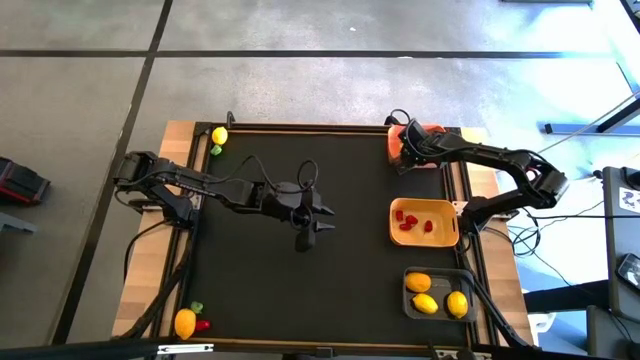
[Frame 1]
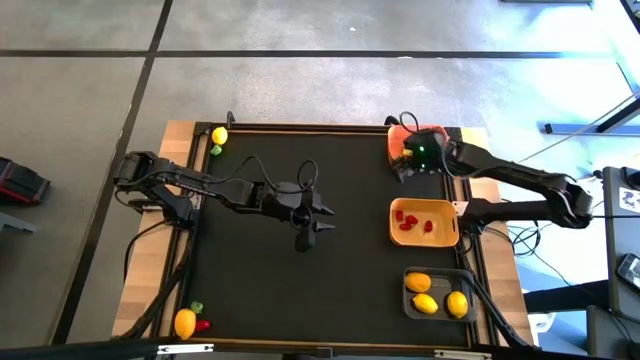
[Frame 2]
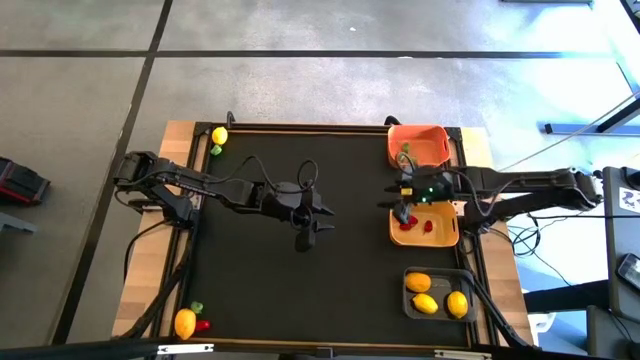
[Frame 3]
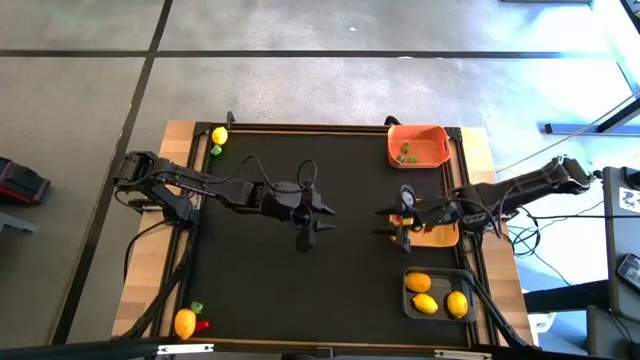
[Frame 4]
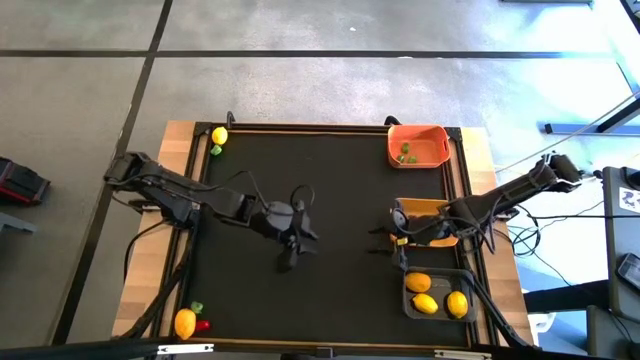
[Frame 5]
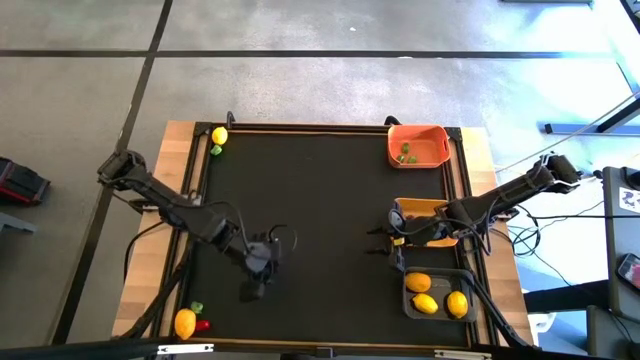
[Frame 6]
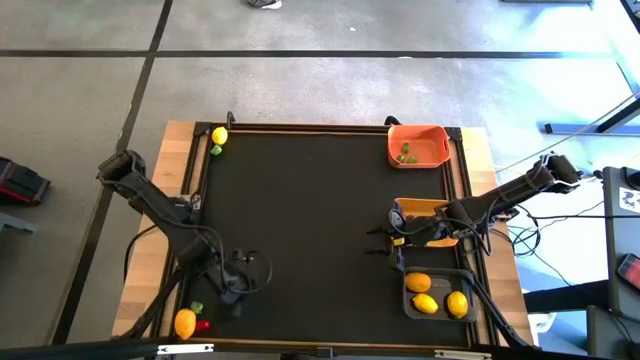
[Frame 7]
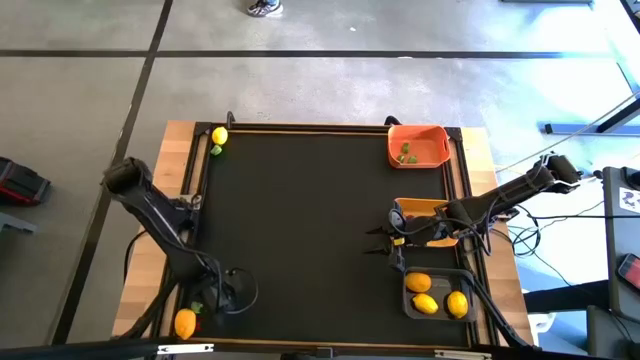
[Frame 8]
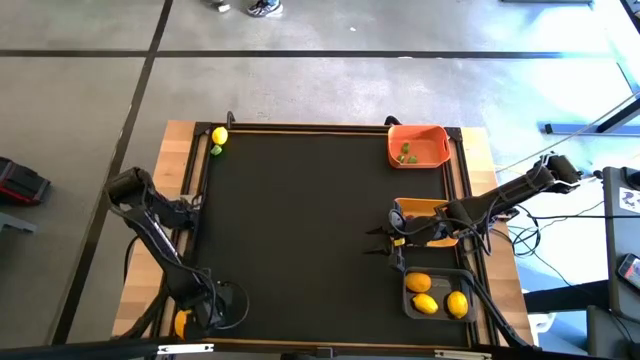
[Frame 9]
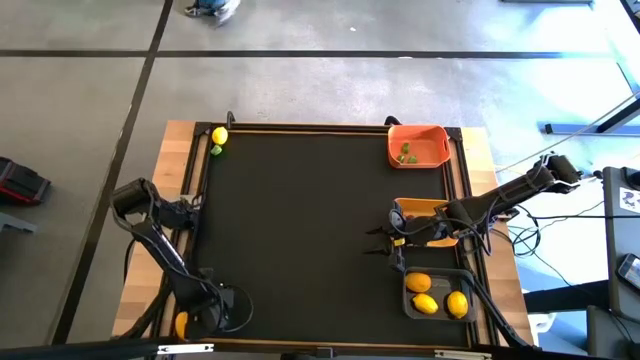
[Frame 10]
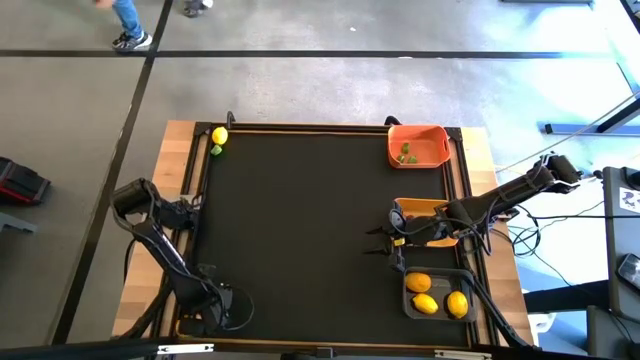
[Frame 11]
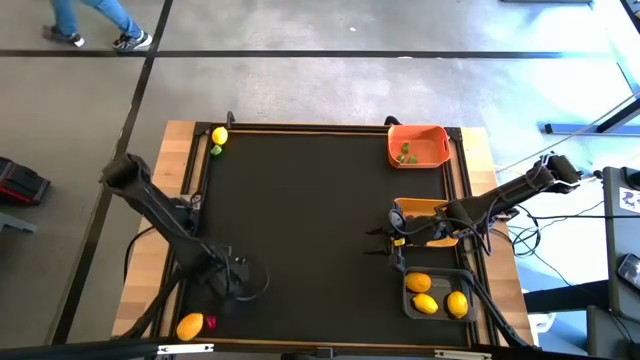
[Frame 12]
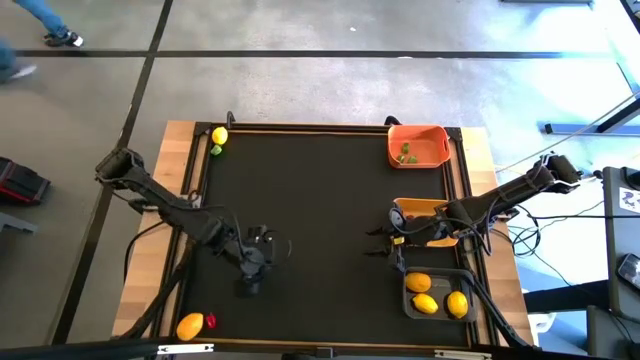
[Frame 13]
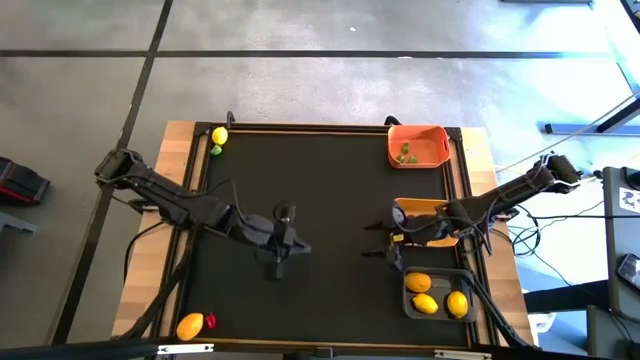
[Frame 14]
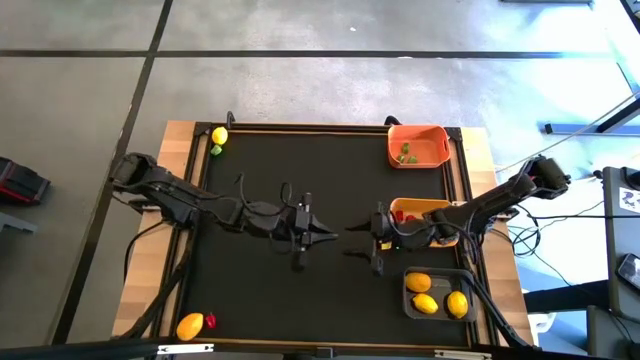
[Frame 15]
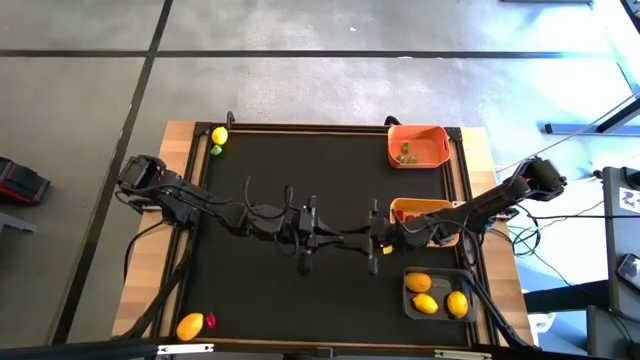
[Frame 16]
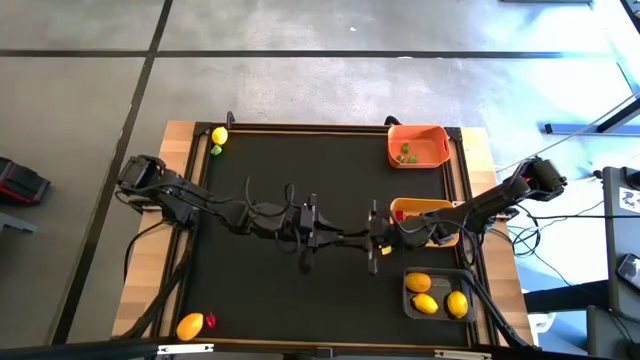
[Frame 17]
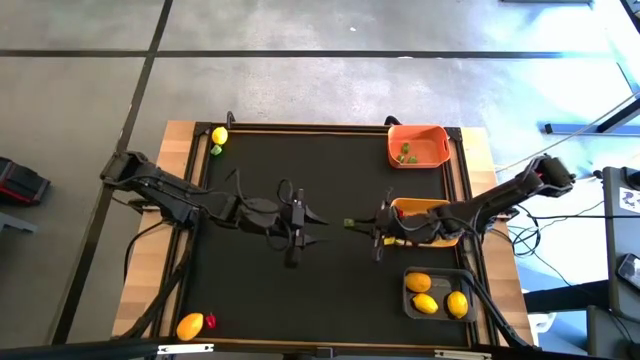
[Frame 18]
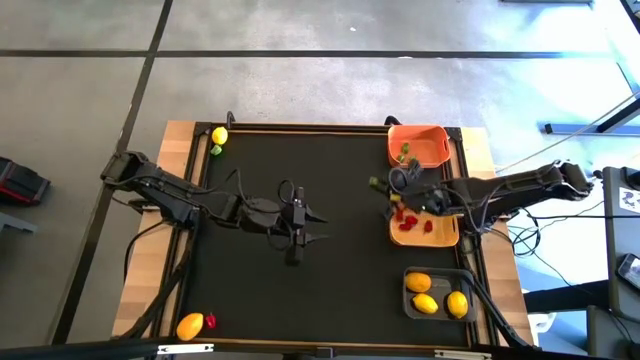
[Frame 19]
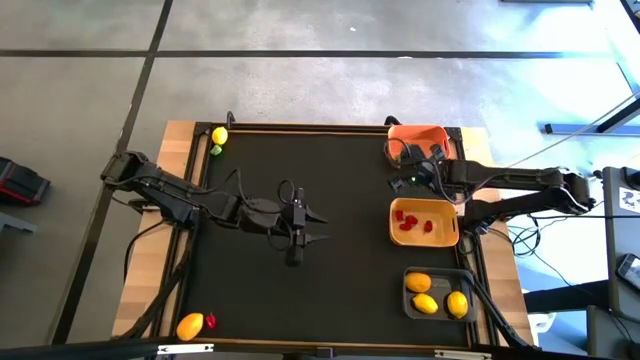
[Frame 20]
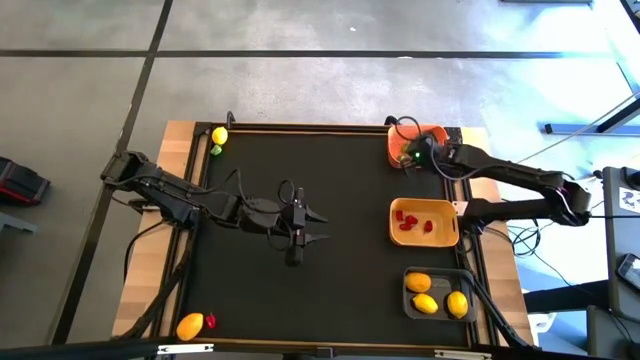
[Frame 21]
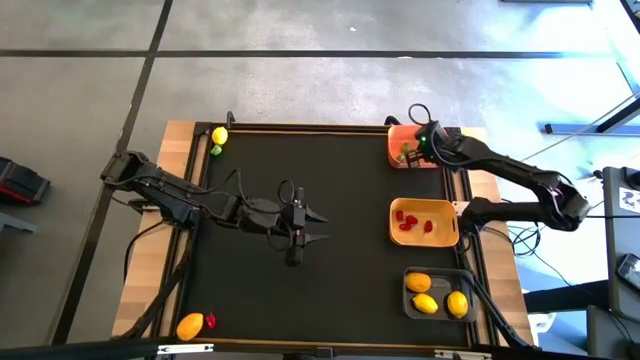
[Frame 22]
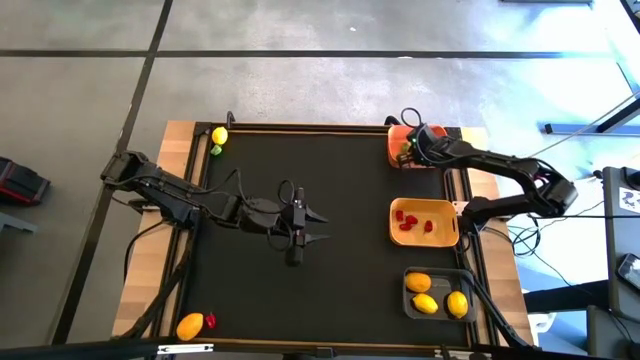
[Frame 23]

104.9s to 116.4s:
Task: Sort produce into baskets
Put the bottom green chili pepper into the orange bin

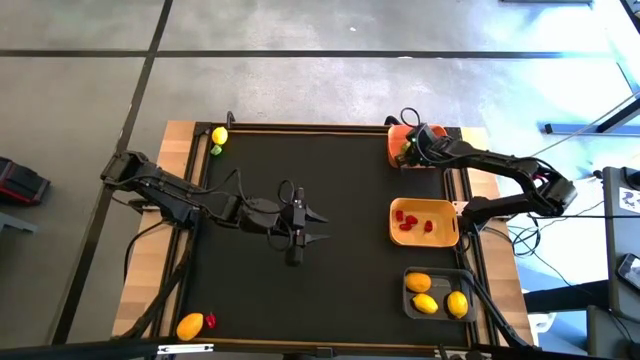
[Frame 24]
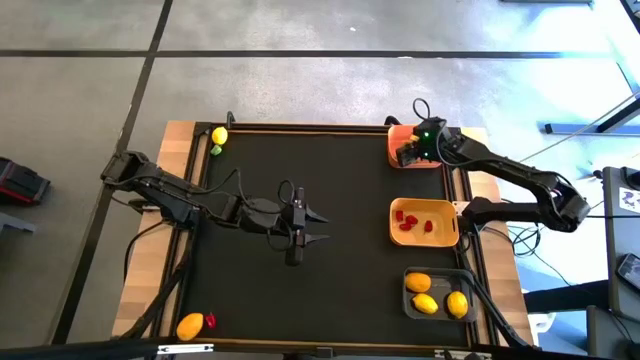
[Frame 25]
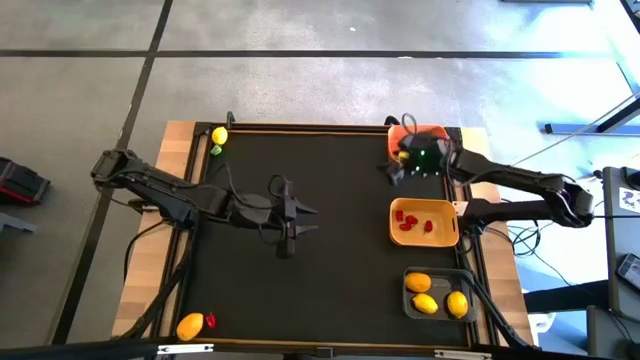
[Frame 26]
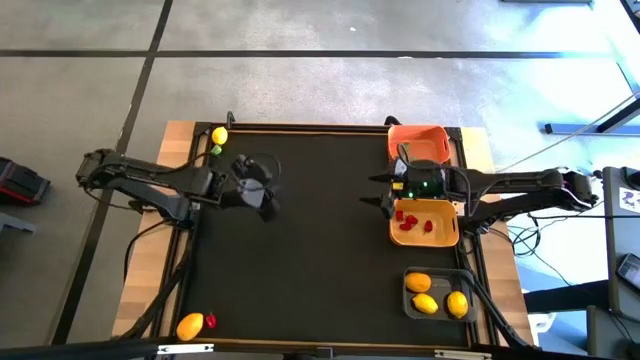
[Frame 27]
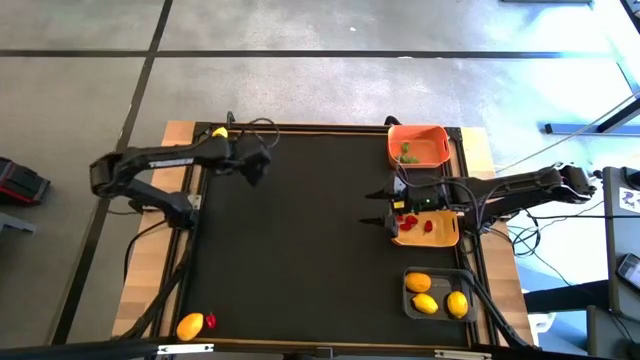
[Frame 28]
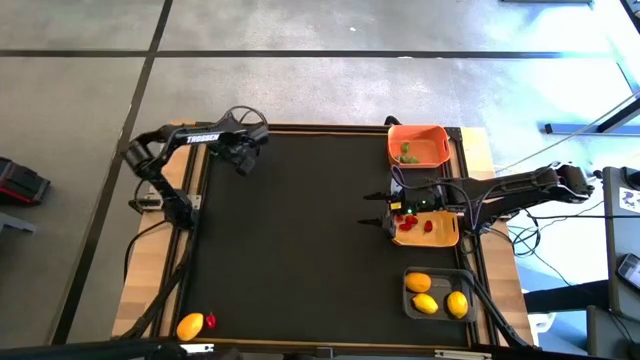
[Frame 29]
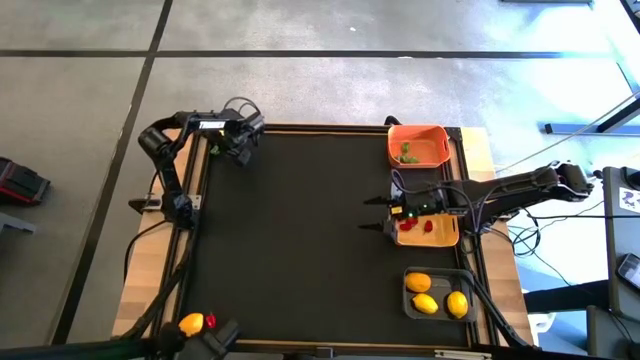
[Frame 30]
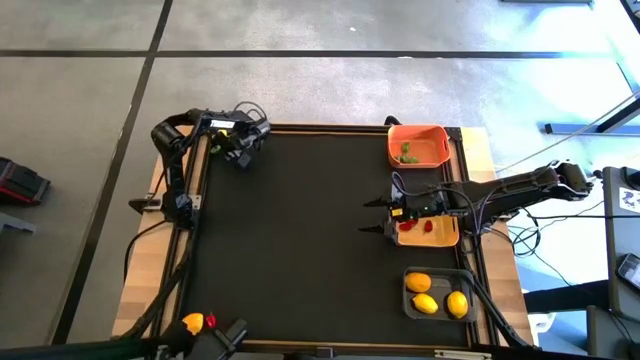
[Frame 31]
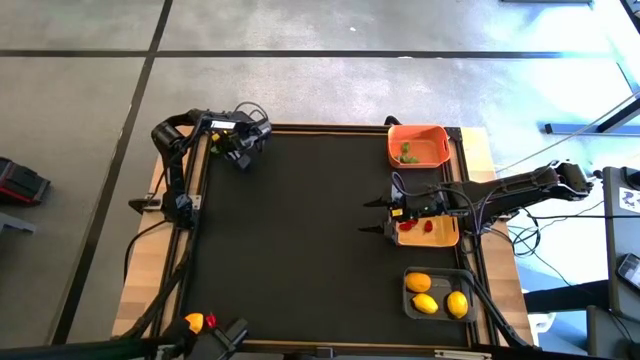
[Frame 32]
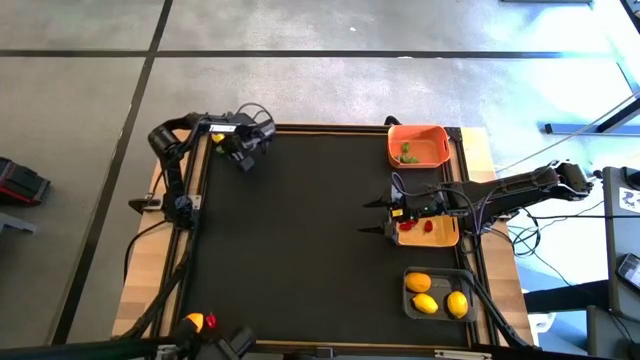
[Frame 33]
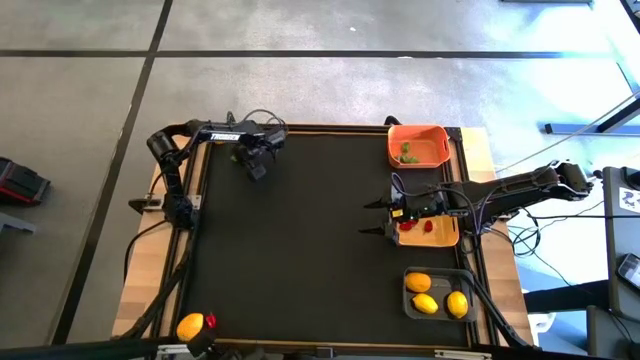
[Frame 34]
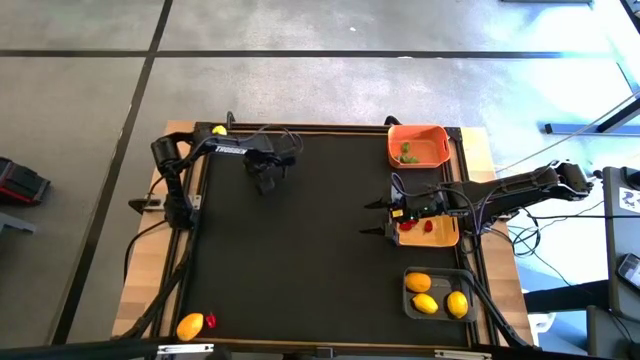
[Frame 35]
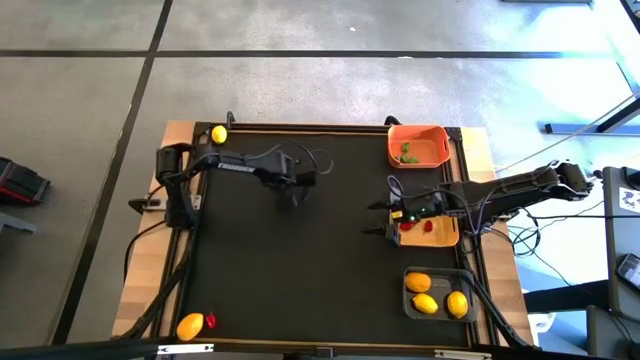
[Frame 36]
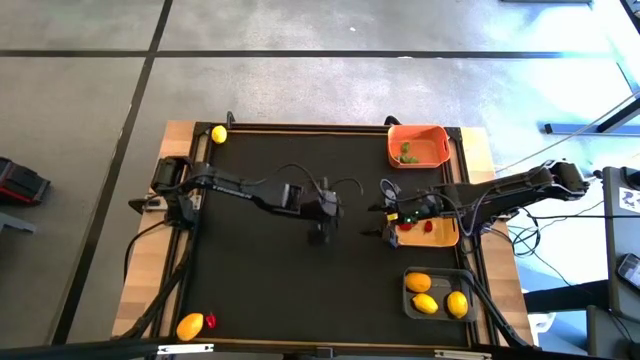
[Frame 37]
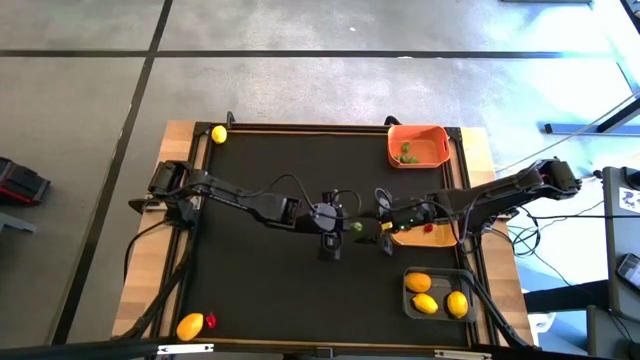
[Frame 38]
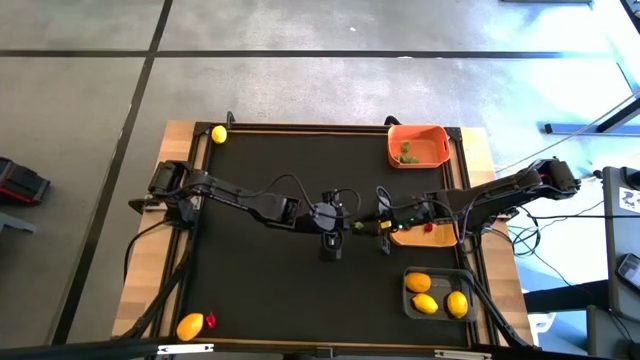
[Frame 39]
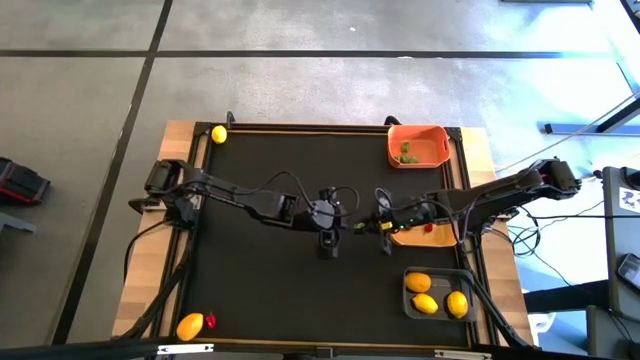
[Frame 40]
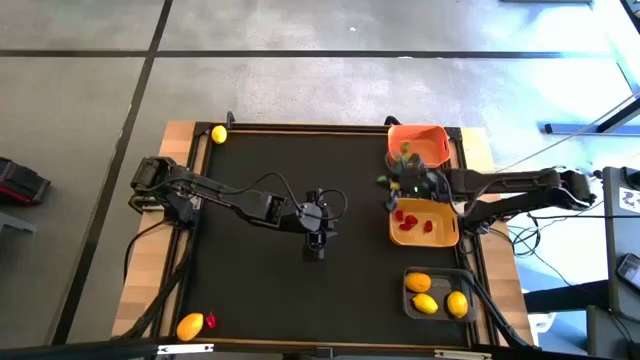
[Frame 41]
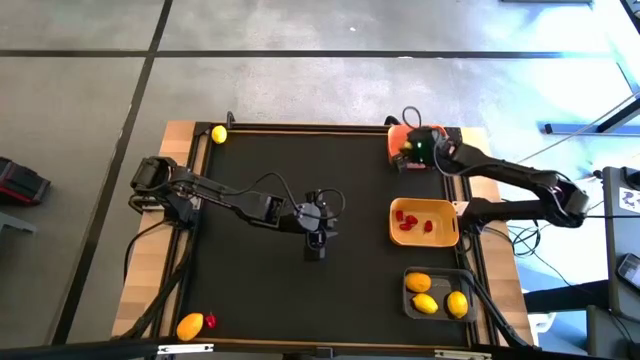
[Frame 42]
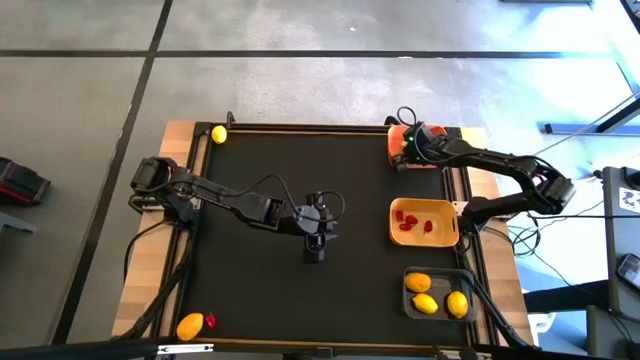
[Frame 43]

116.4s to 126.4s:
Put the green chili pepper into the orange bin
